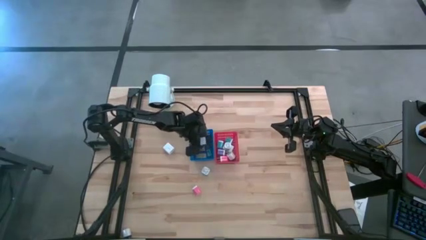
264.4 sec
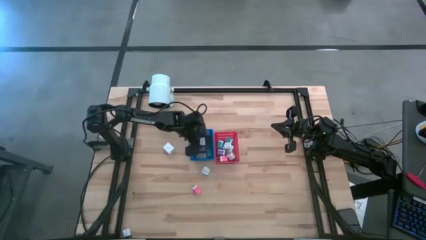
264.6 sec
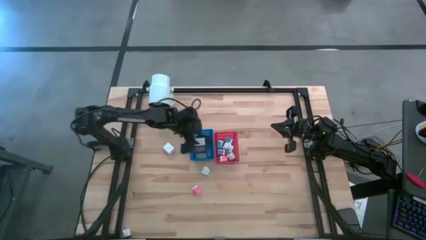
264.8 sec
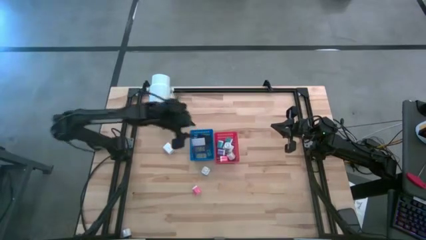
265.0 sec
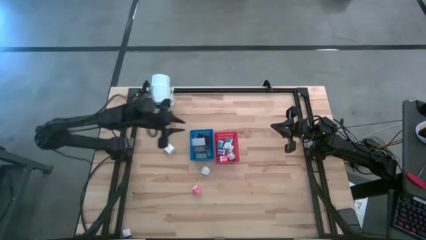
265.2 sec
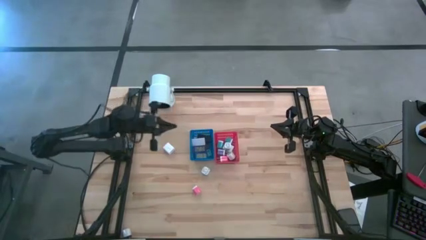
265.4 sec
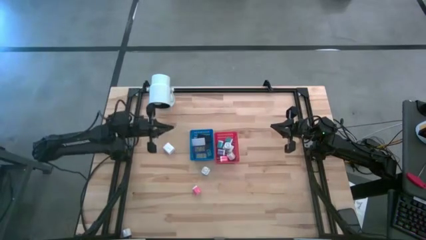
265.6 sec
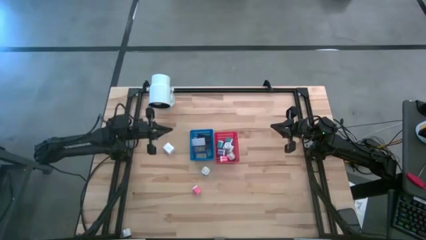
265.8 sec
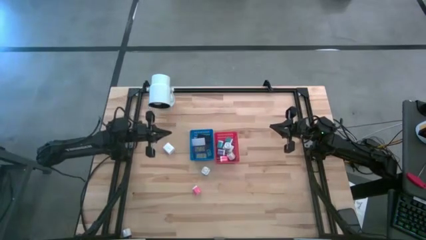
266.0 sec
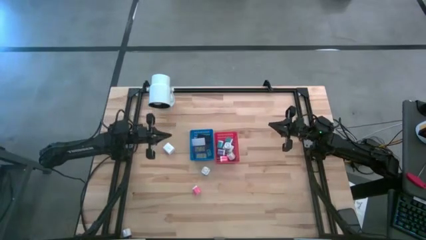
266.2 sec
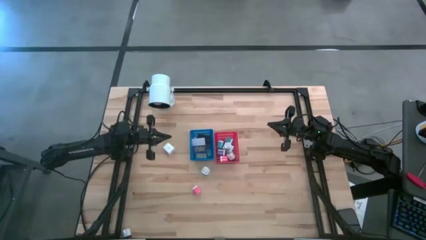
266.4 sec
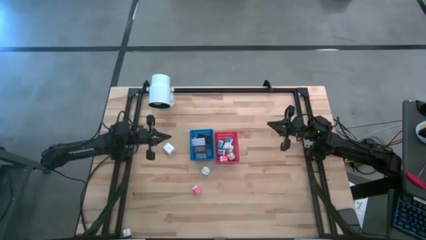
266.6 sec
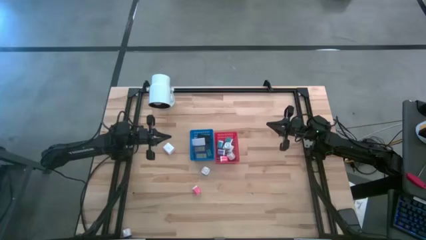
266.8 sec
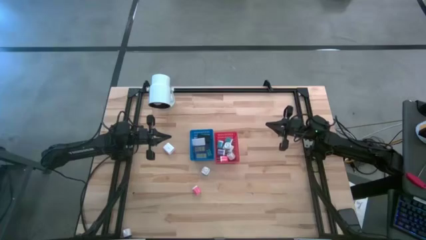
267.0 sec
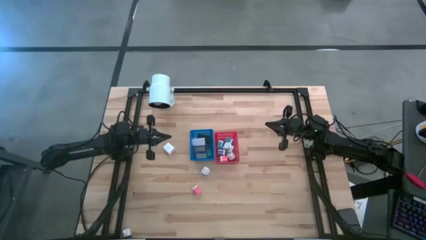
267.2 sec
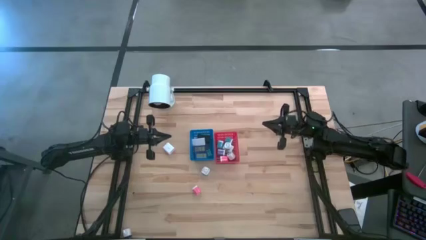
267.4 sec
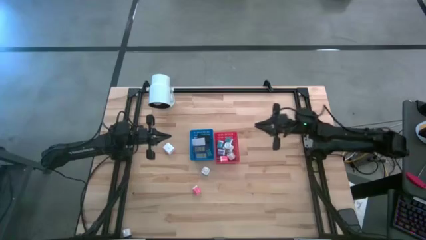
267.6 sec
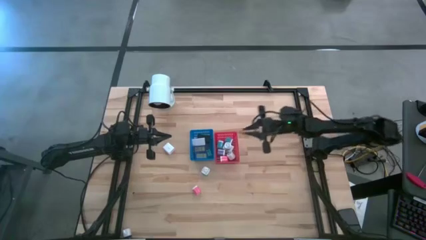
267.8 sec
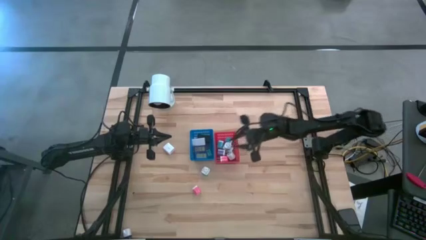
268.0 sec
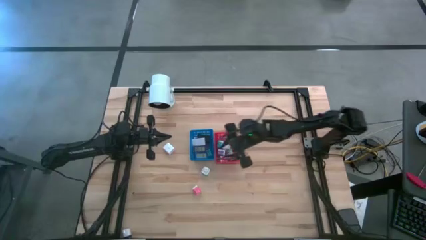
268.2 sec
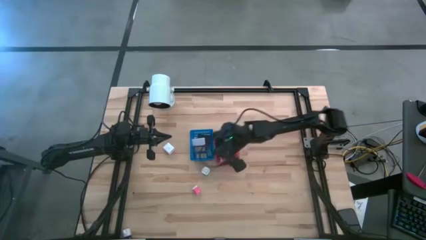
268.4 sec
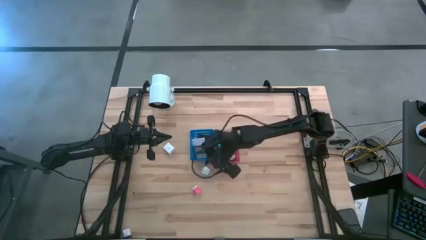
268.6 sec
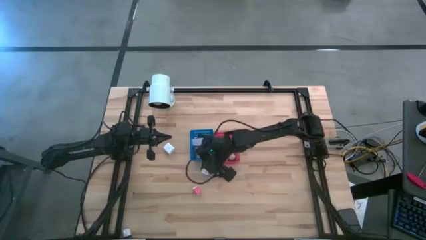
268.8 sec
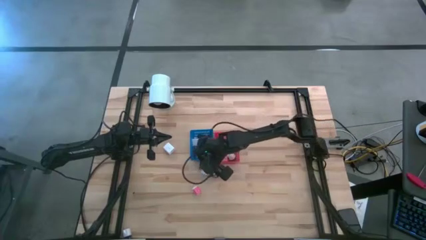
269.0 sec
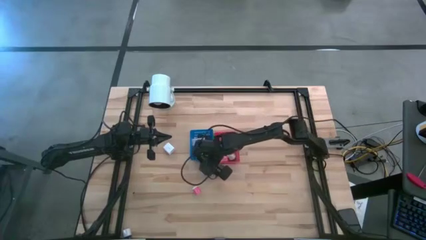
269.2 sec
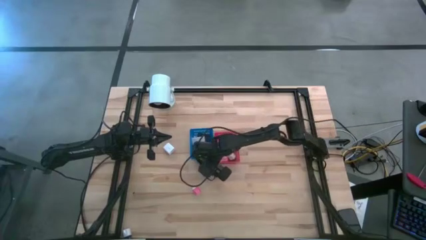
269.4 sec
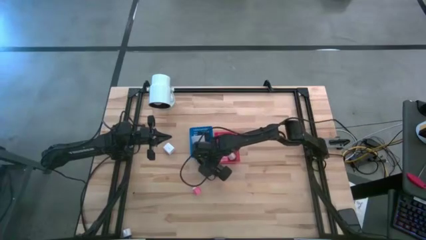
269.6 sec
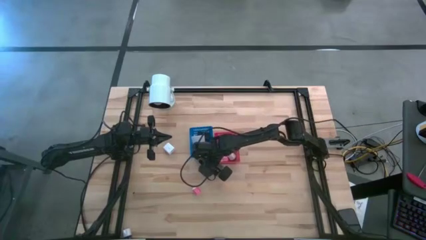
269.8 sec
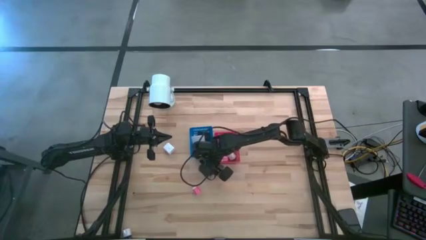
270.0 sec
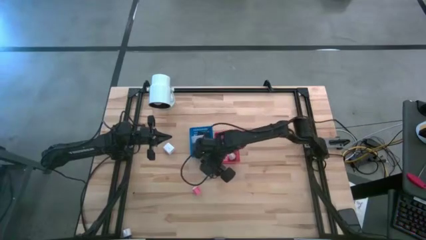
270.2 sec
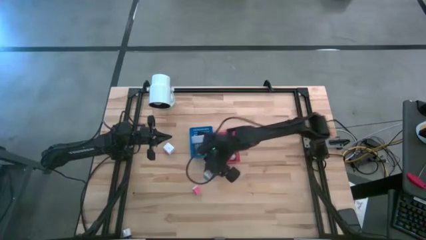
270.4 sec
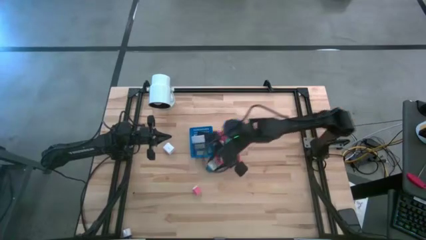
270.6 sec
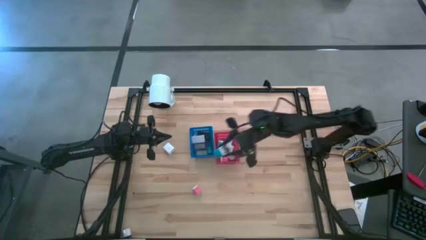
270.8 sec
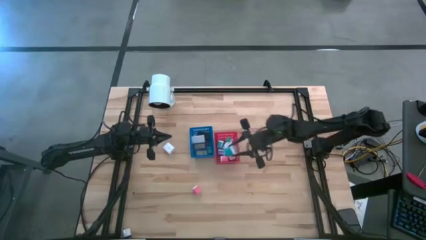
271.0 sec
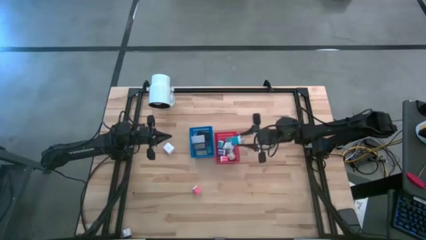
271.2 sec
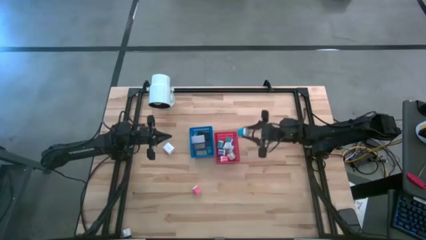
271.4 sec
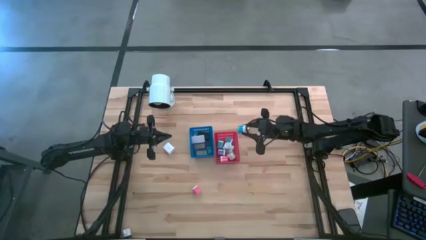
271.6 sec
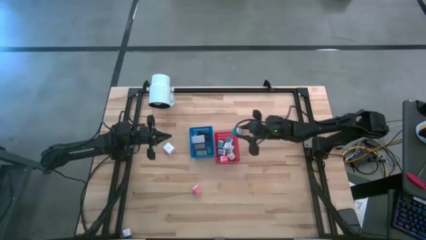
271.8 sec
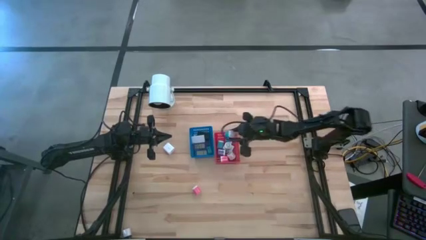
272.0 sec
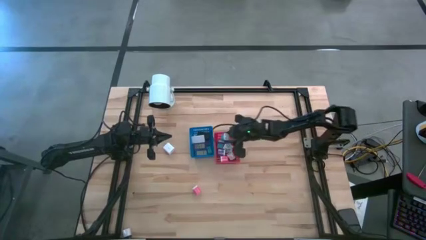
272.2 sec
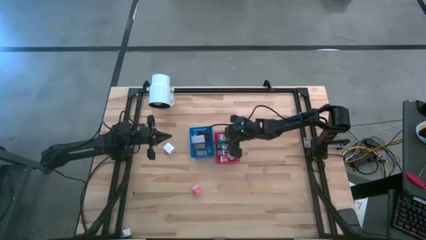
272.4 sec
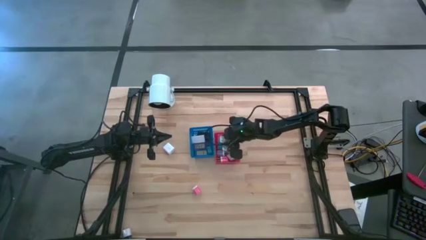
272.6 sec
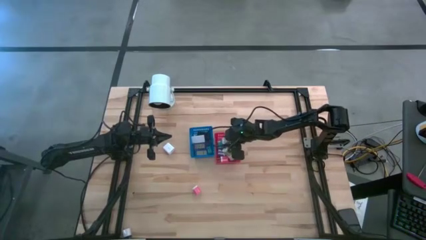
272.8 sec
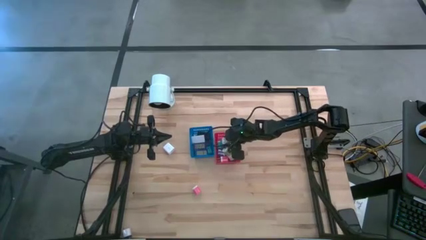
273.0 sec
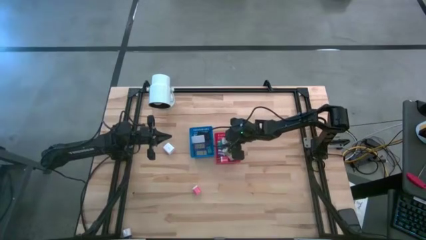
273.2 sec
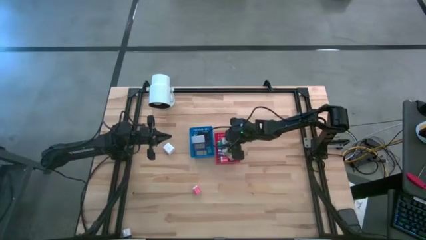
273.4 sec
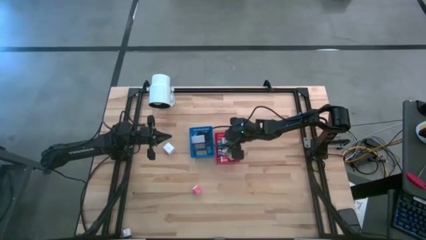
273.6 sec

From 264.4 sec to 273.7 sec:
Task: Pick & Place Office items
Put the blue charger adapter into the red bin

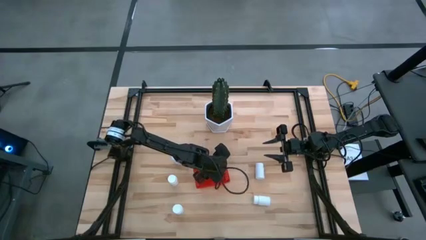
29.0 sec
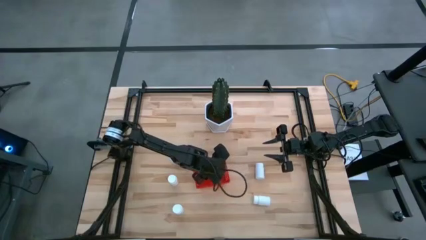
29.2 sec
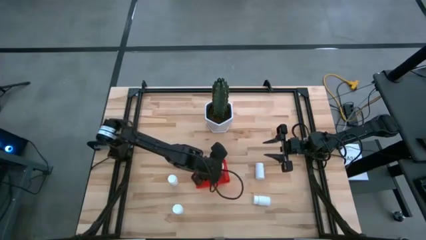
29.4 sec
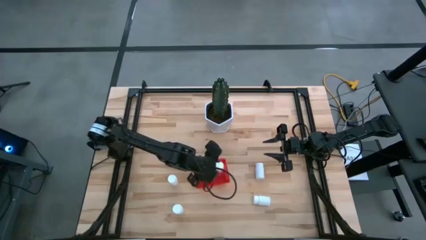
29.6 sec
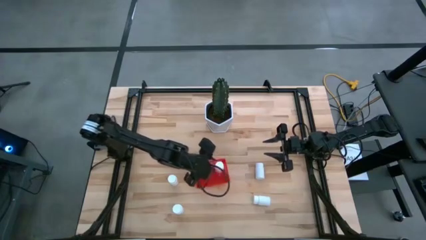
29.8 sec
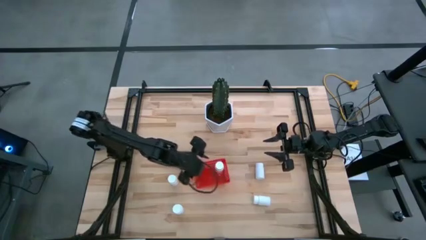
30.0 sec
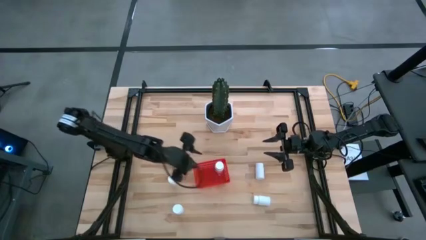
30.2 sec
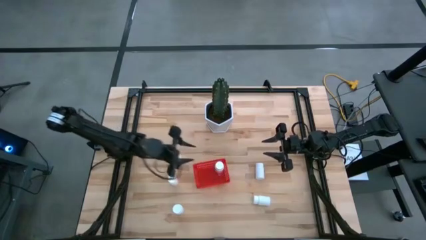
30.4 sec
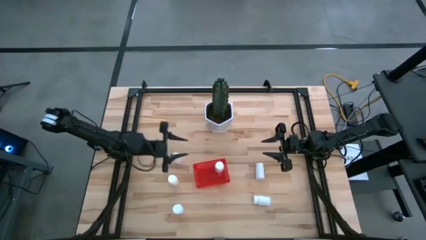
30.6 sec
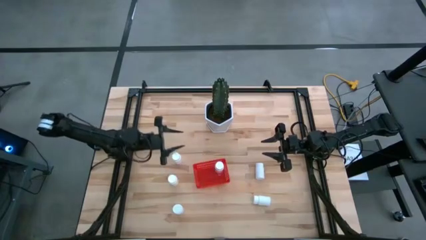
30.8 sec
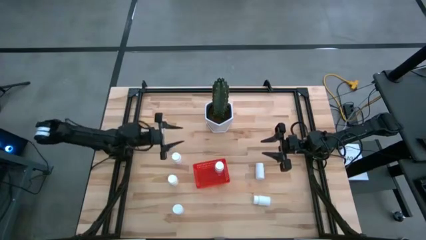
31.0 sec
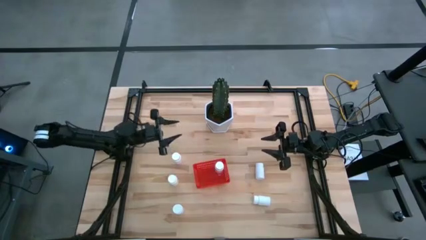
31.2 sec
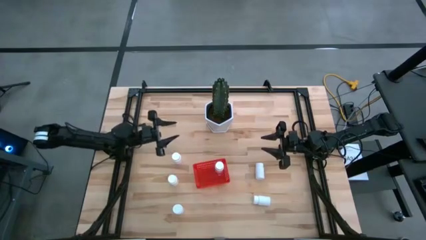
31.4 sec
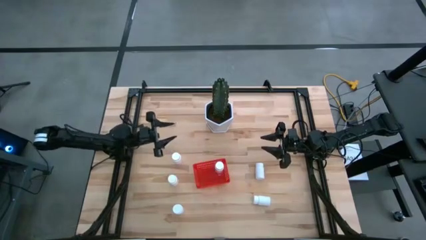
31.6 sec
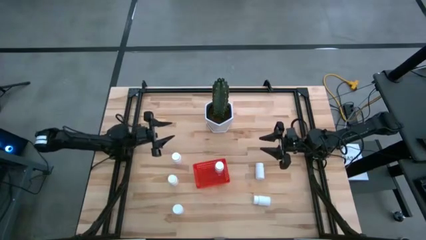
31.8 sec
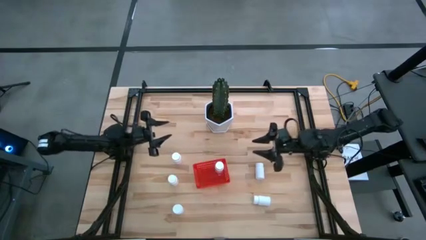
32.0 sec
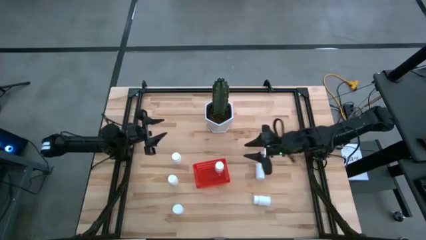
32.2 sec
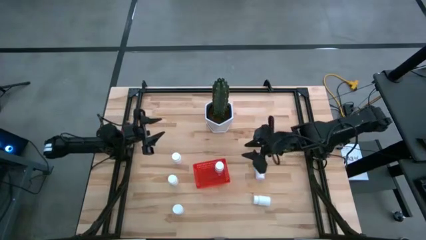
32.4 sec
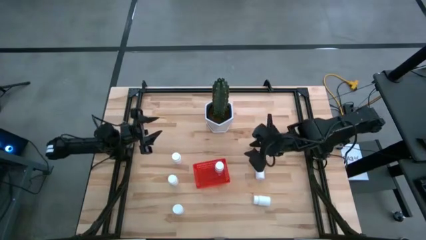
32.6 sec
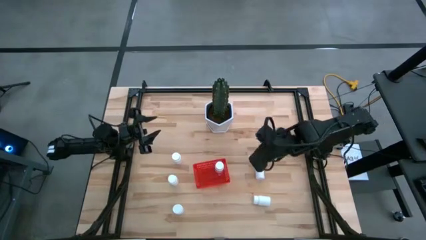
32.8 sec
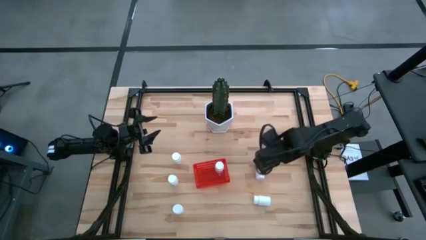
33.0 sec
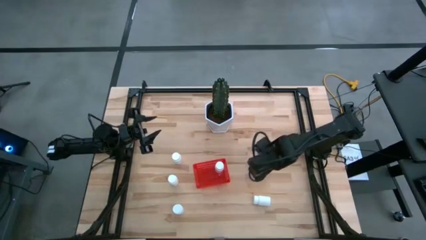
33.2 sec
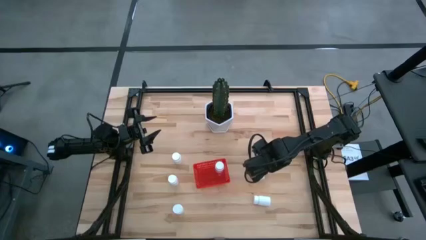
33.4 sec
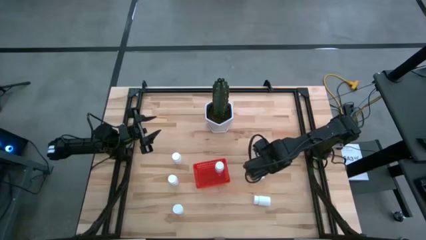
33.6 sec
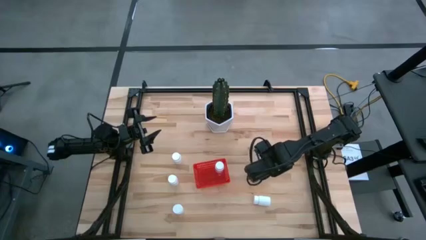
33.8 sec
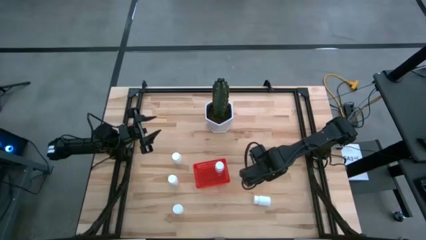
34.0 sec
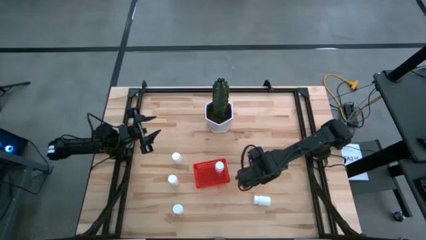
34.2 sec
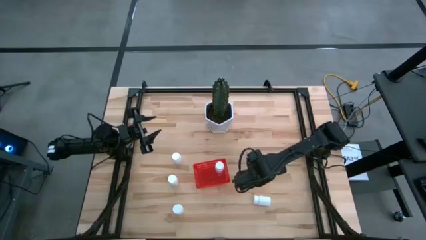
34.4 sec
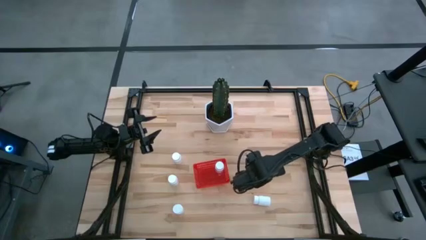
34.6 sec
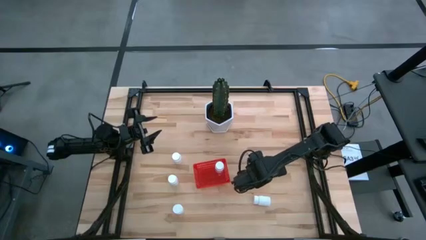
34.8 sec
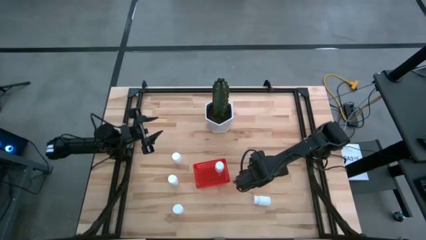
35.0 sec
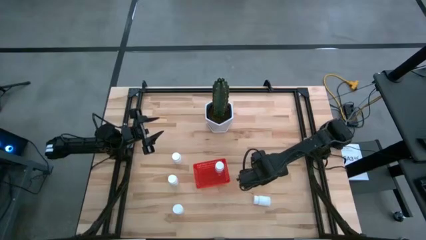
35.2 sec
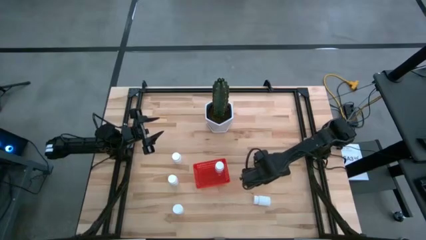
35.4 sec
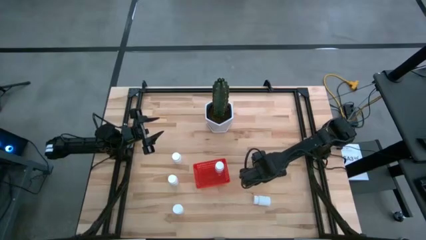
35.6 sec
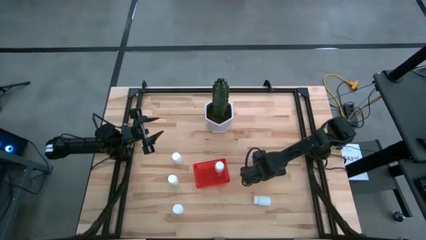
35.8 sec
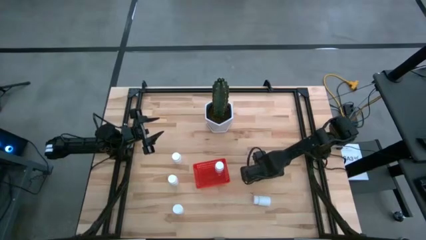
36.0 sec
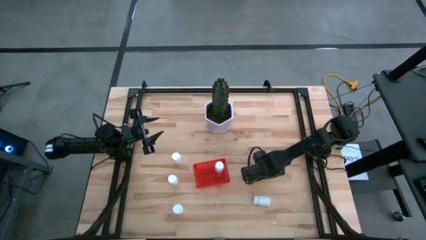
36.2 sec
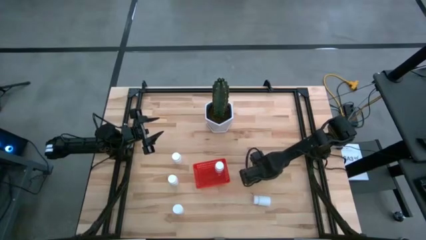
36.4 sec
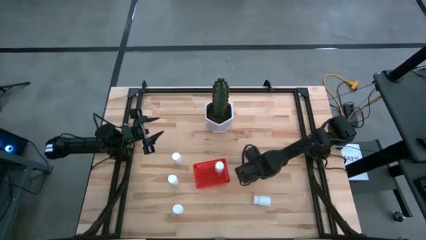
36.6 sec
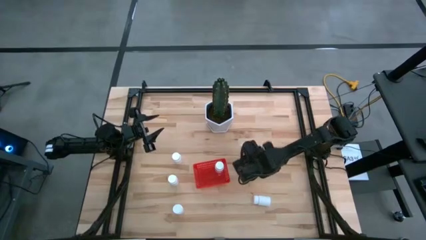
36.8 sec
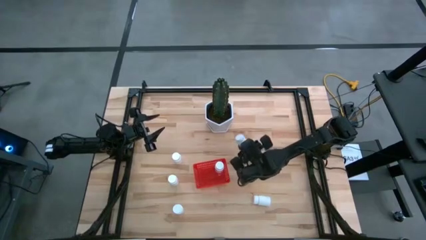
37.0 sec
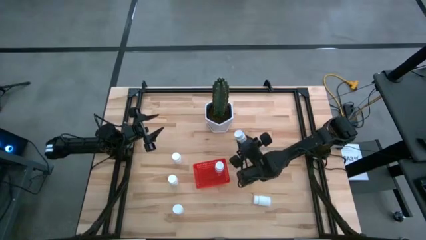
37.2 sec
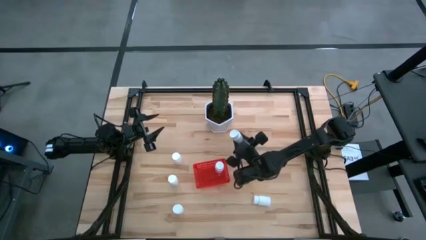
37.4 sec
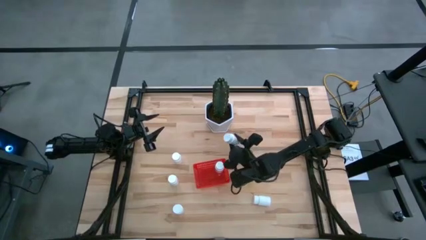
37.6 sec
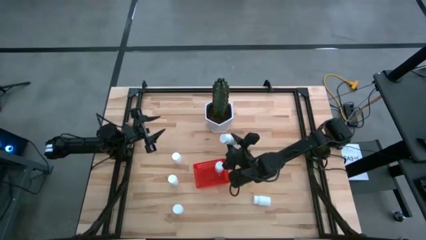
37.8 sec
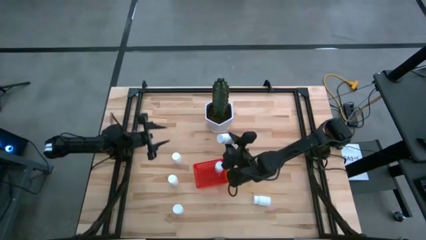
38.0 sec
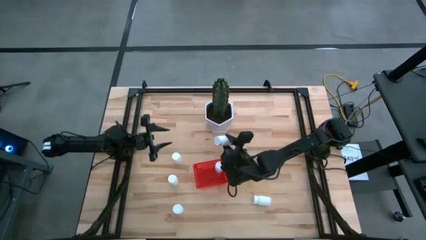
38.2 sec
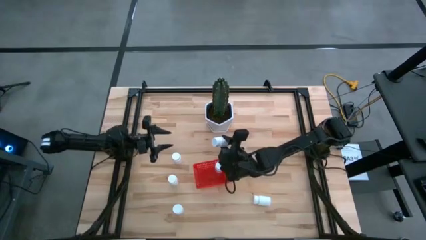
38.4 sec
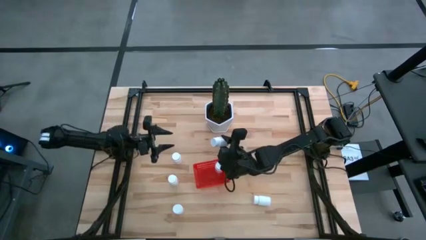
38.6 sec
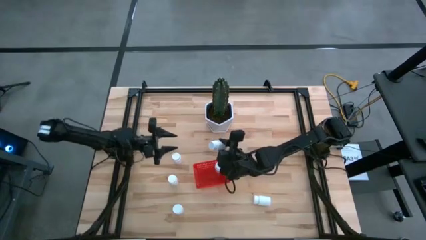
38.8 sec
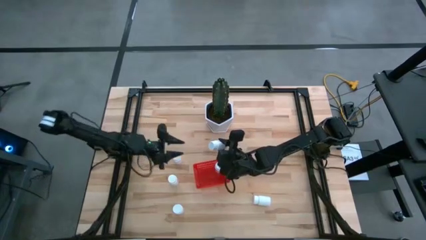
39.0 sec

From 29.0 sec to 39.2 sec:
Task: Pick and place pill bottles into a basket
Put the white pill bottle into the red bin
